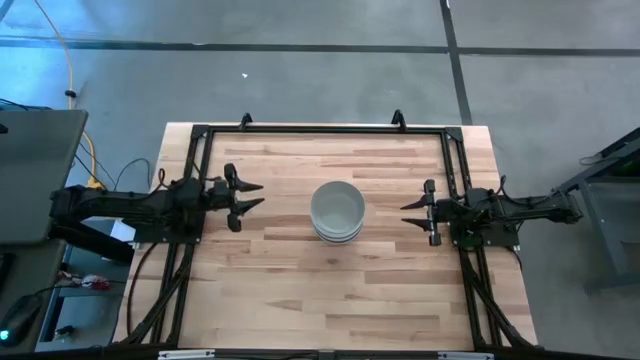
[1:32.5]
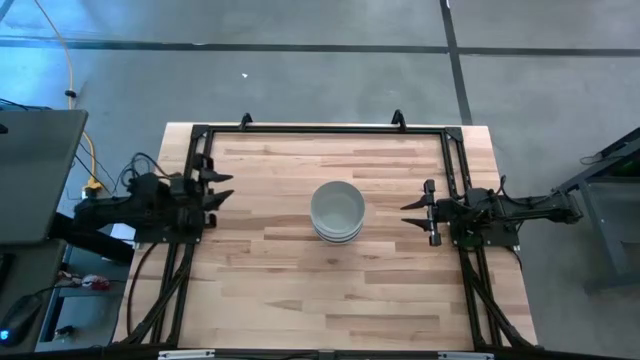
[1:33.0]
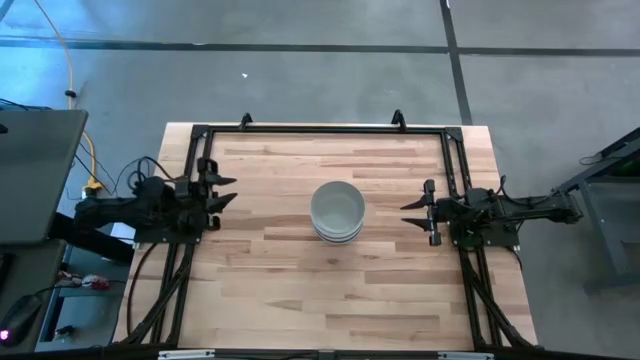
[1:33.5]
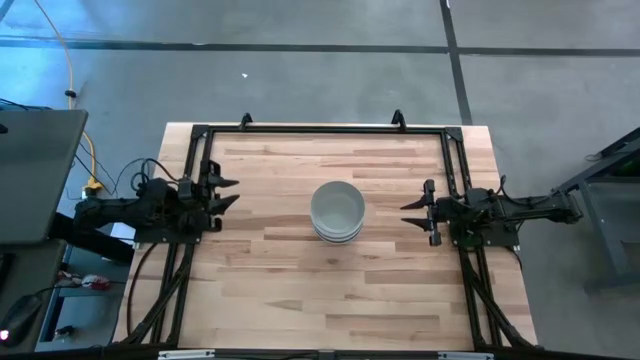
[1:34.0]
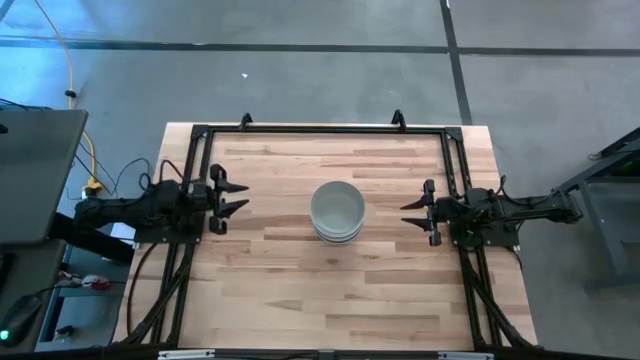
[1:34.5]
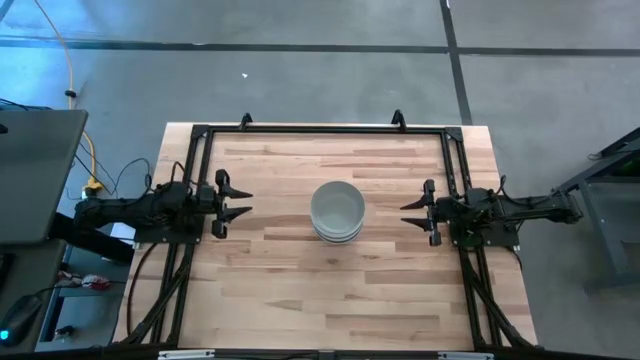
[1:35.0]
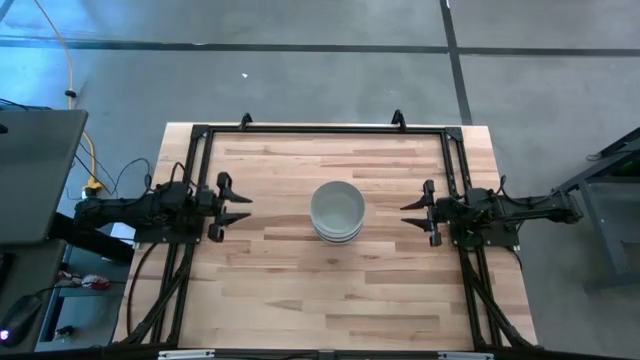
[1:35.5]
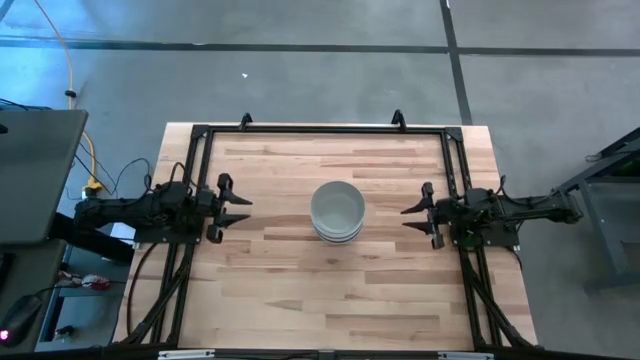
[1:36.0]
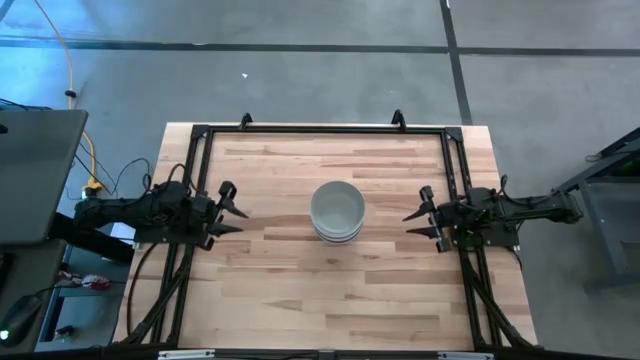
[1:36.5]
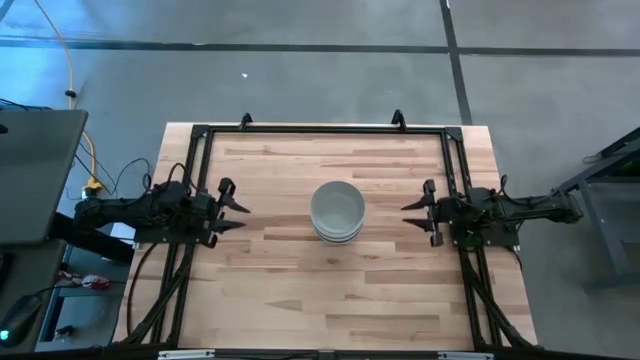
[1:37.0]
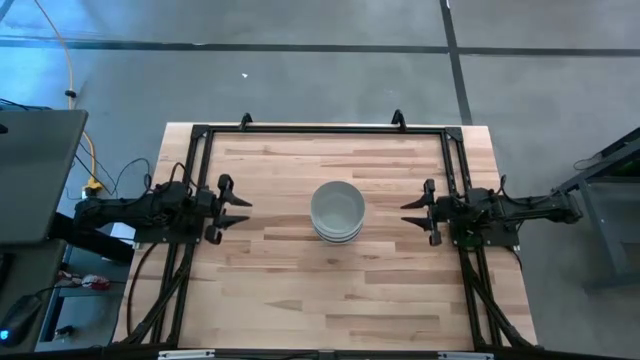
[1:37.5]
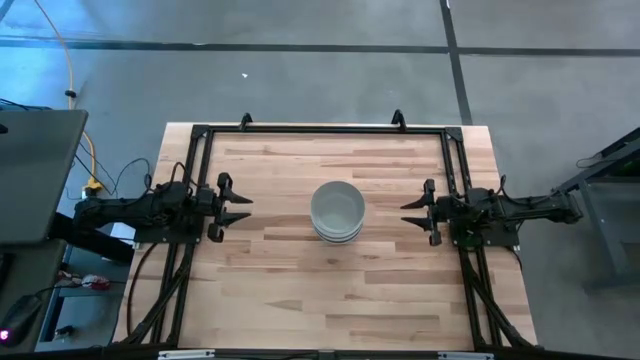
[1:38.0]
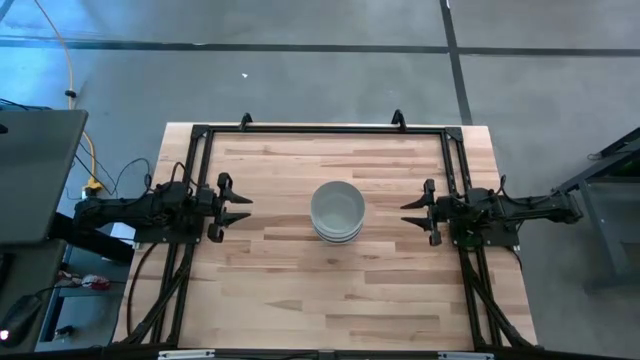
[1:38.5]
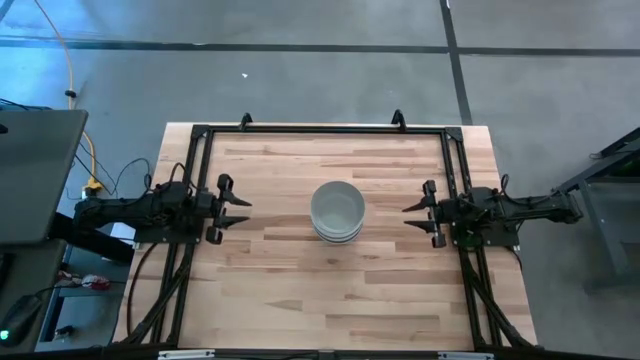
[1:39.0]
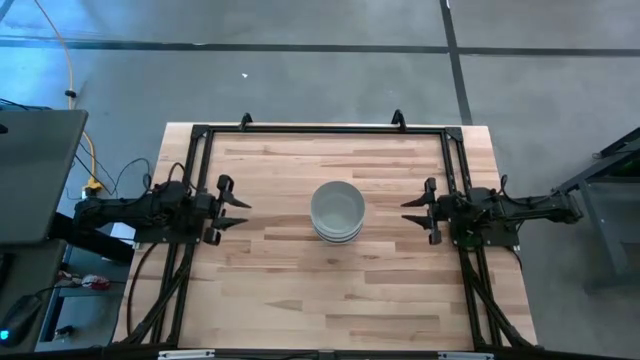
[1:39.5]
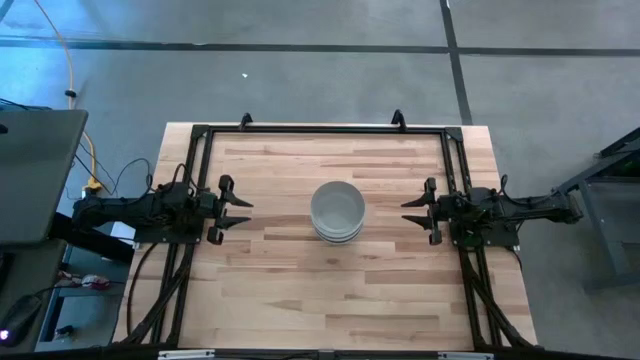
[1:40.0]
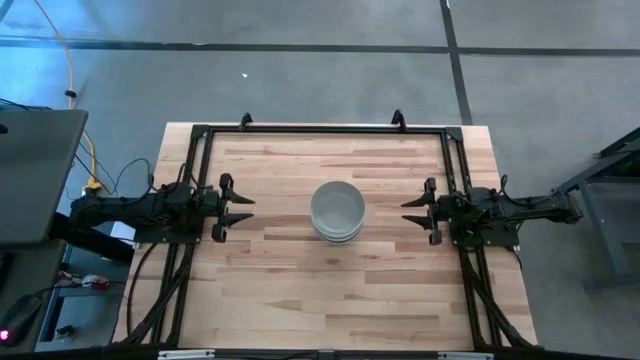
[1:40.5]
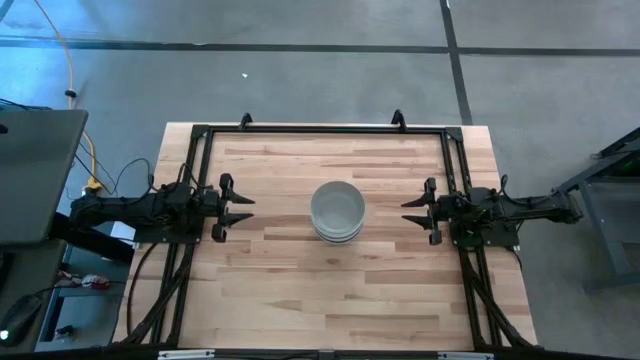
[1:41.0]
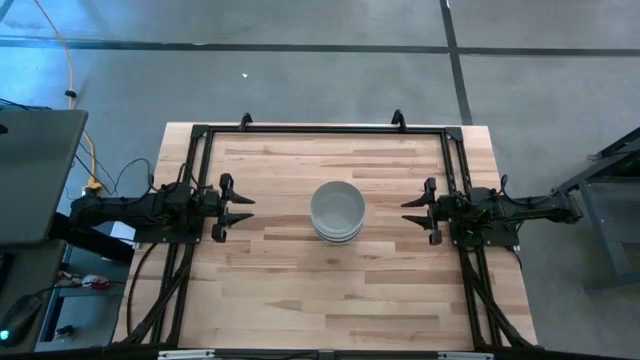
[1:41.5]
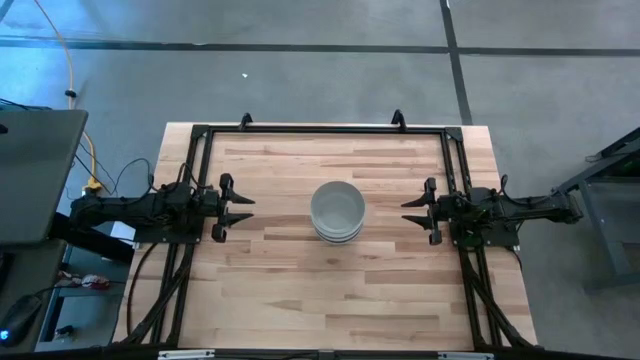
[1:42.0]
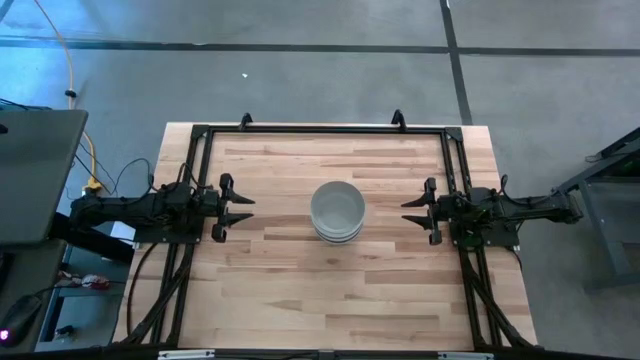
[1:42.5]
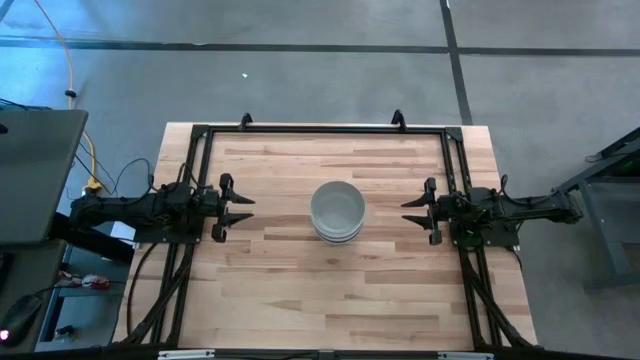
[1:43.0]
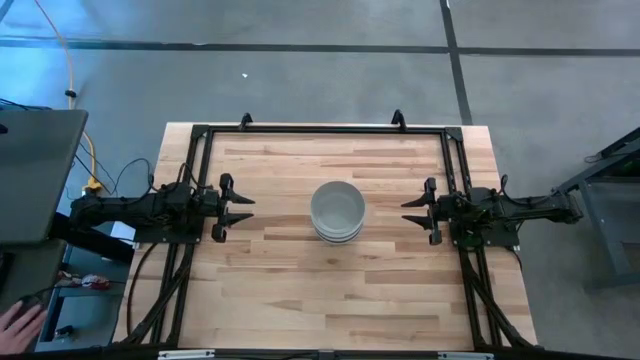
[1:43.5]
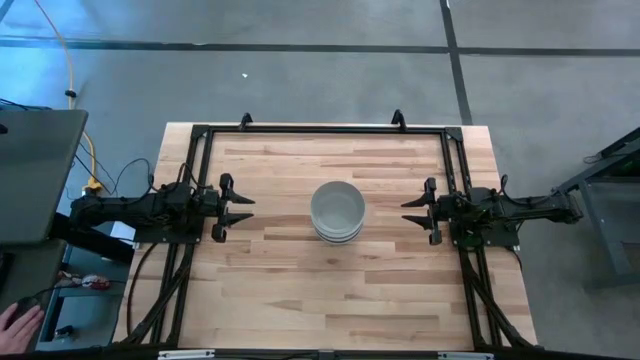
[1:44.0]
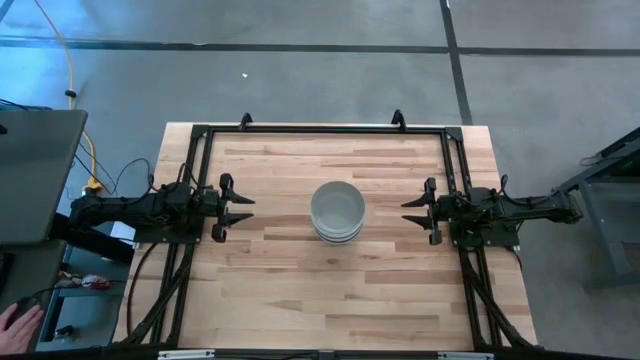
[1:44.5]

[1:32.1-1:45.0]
Task: Nest bowls inside each other
Return to Home Position

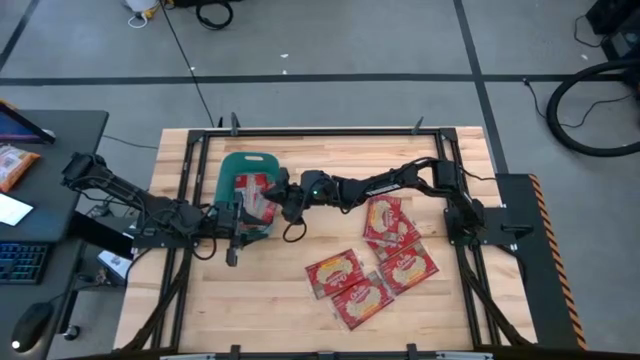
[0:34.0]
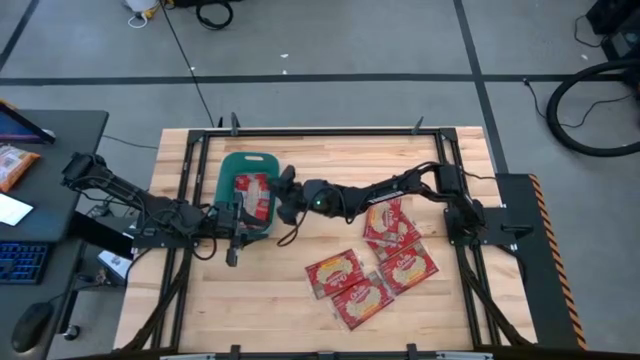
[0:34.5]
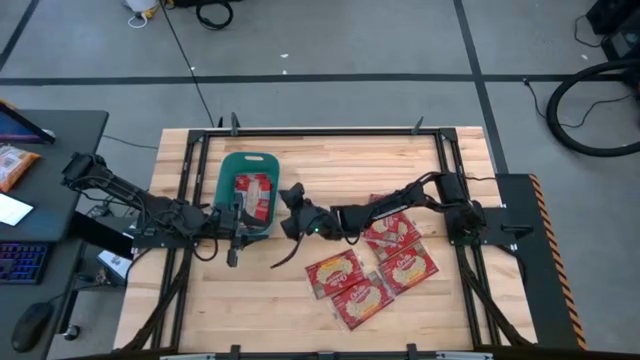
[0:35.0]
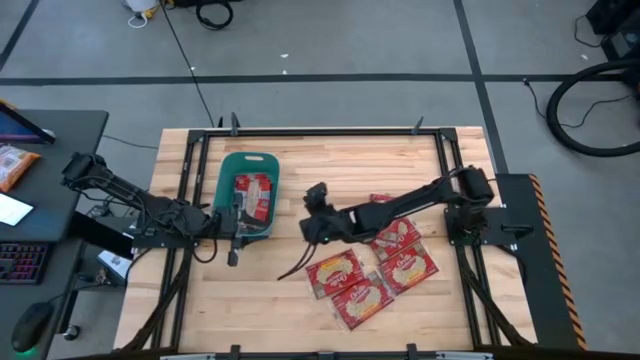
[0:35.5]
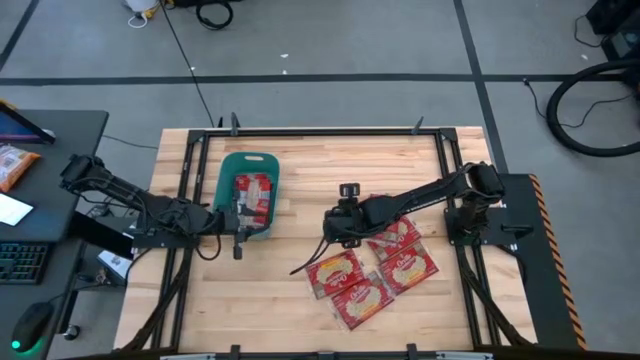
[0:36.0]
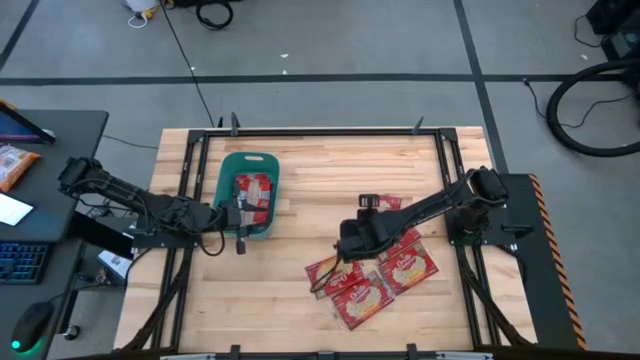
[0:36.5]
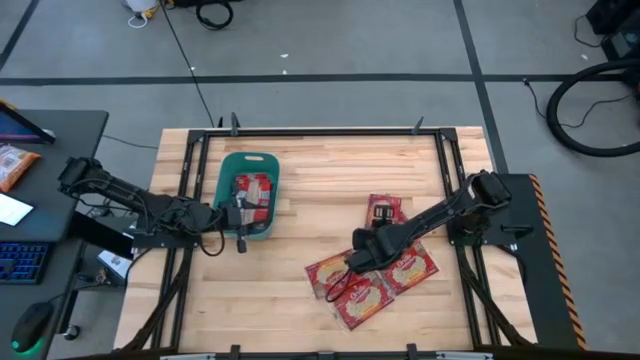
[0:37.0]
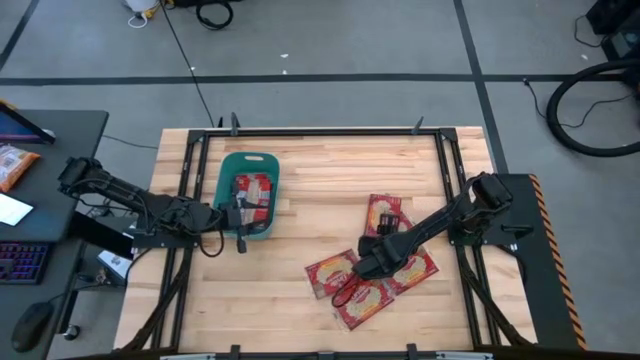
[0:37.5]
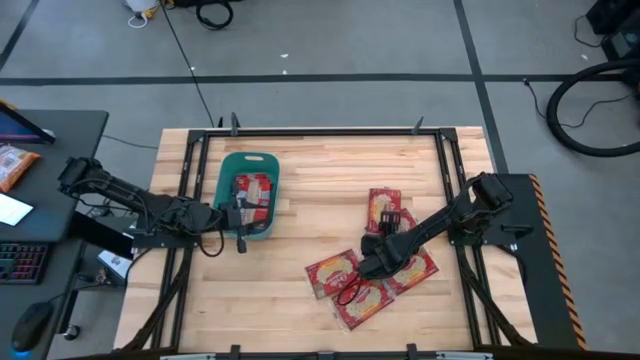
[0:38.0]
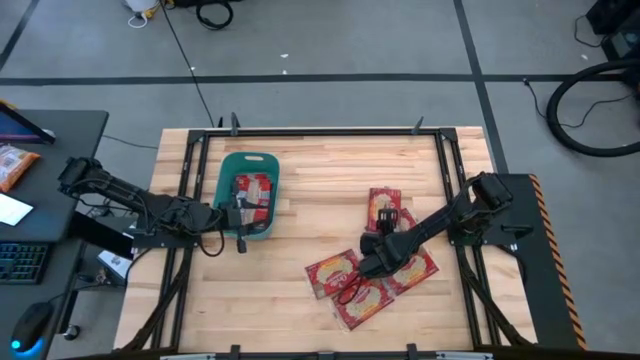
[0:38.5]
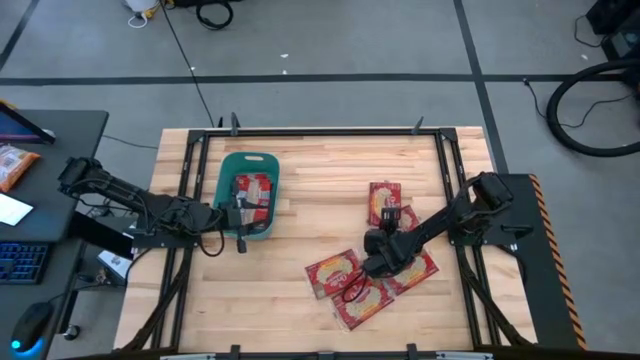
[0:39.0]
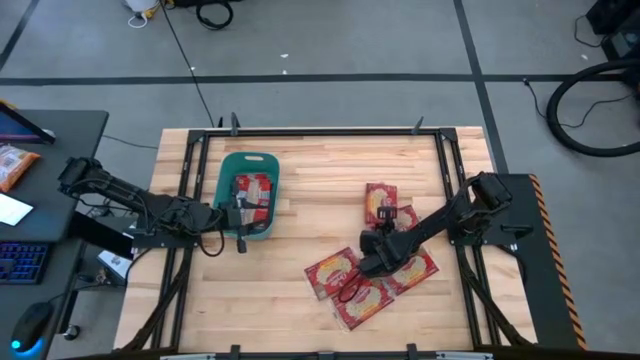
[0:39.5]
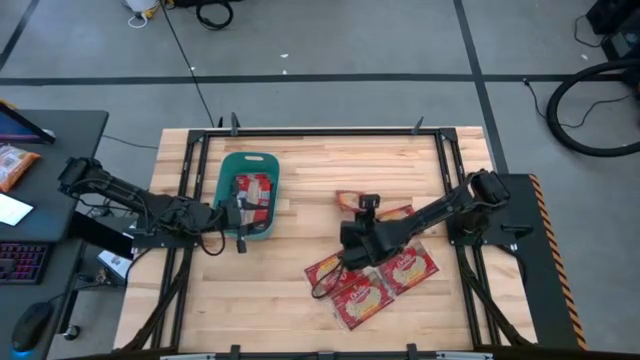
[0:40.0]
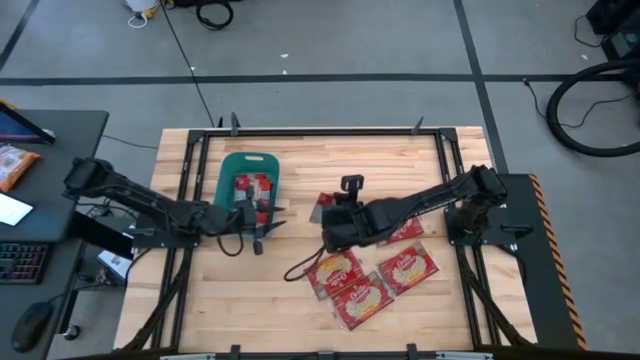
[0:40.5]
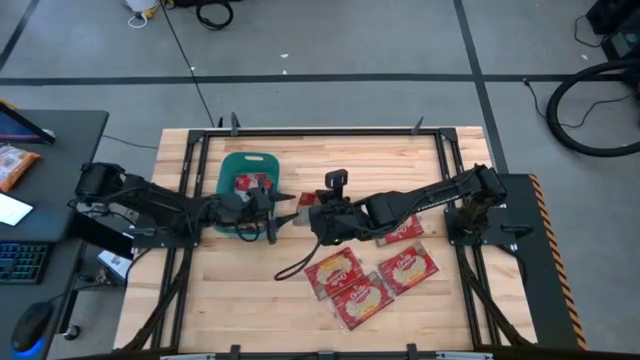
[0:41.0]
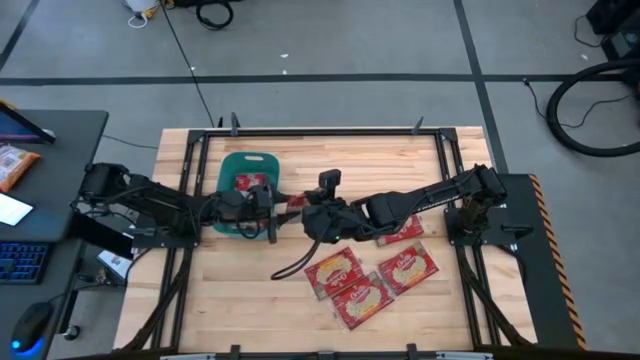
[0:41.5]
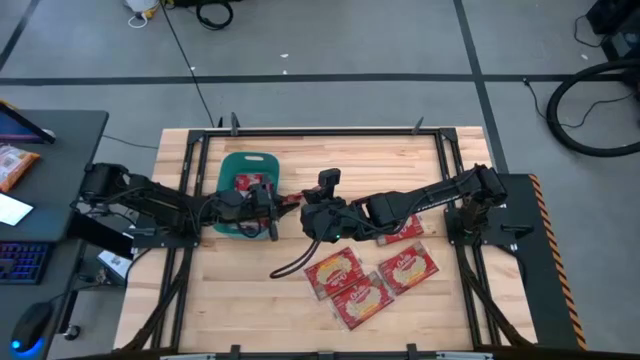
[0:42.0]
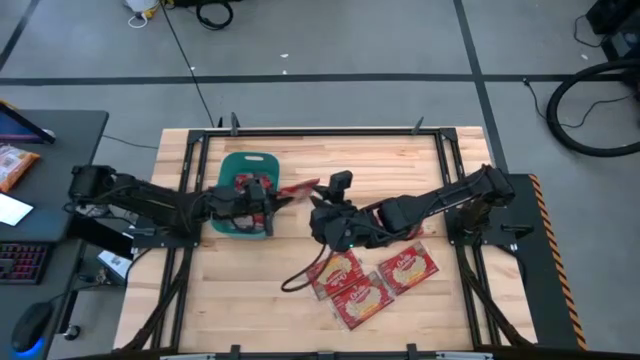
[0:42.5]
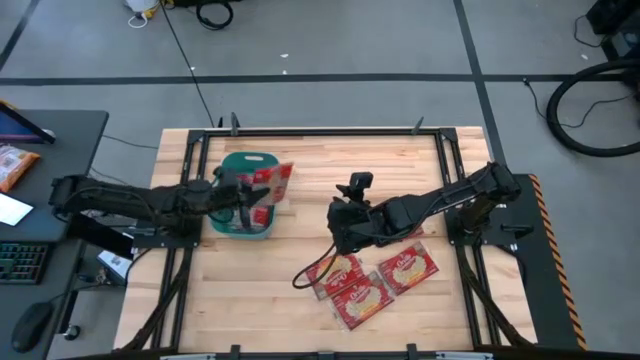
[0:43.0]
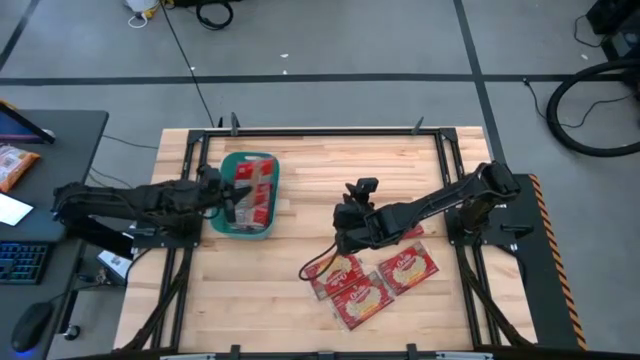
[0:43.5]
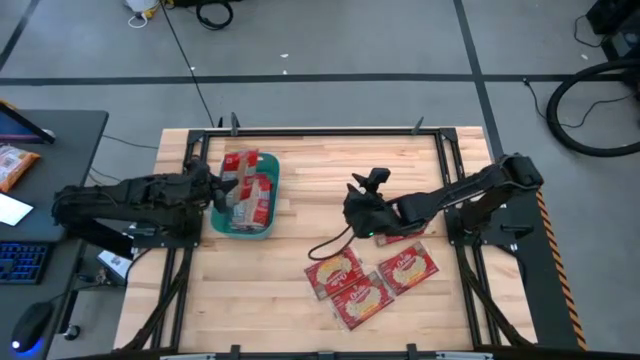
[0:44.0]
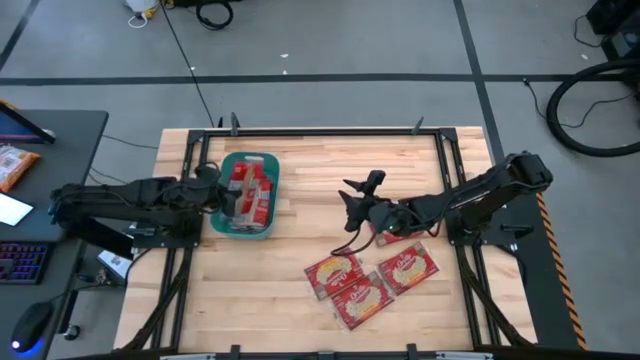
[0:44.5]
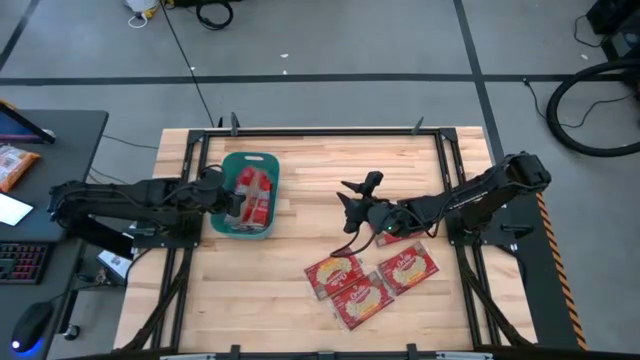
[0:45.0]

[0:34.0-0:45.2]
Task: Sort popcorn bags into baskets
Put the red popcorn bag into the green bin
